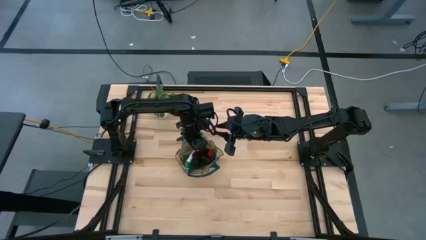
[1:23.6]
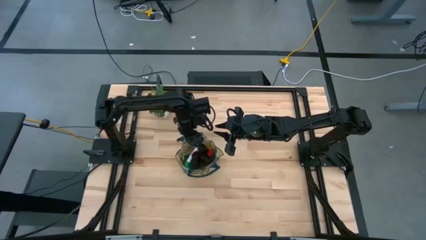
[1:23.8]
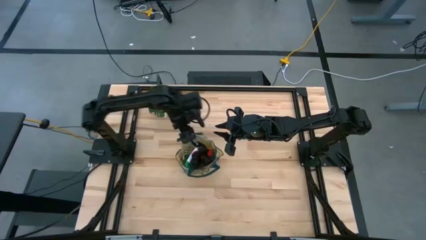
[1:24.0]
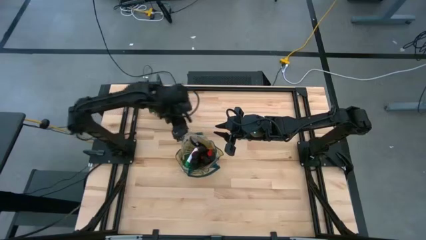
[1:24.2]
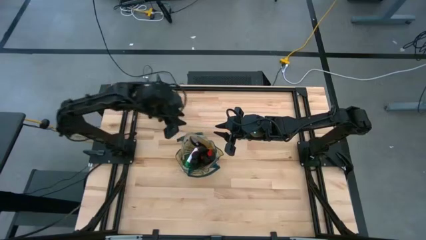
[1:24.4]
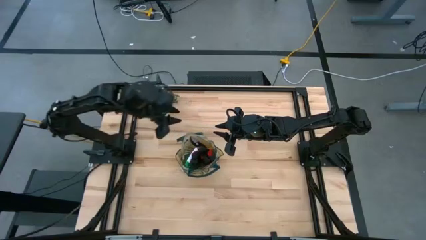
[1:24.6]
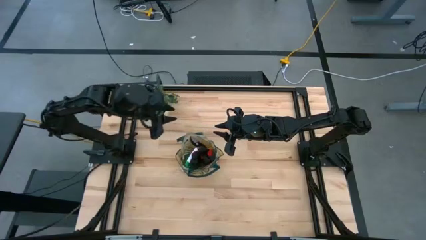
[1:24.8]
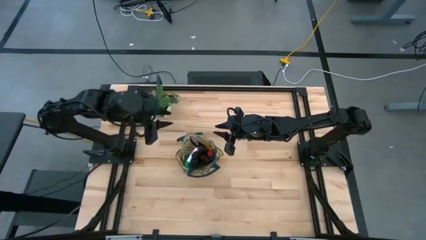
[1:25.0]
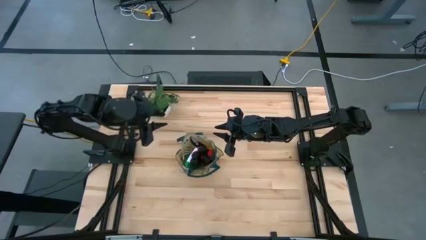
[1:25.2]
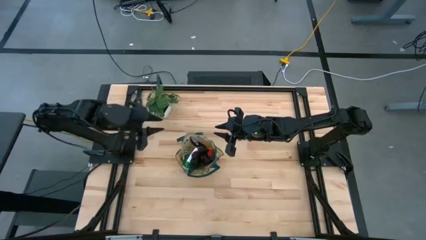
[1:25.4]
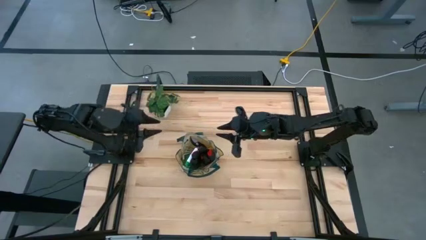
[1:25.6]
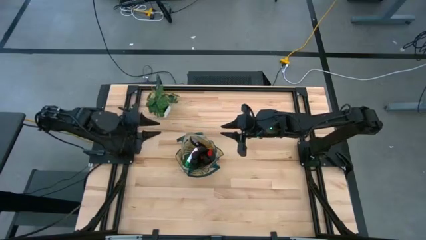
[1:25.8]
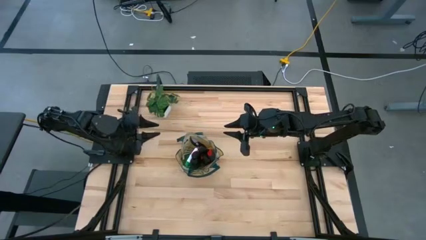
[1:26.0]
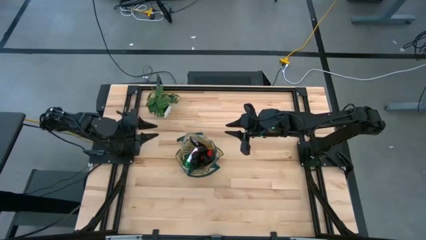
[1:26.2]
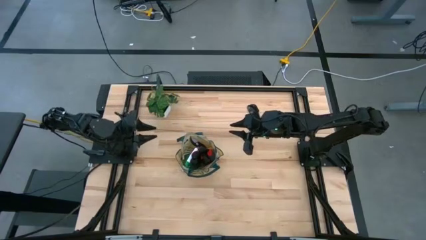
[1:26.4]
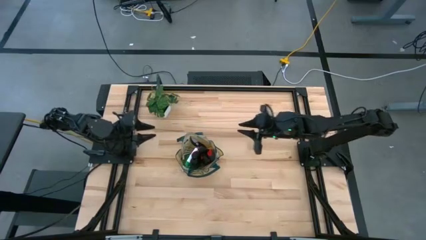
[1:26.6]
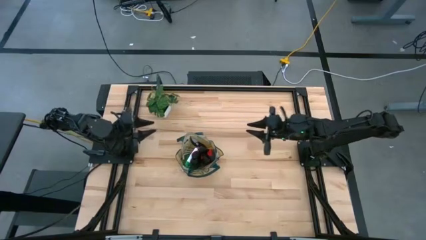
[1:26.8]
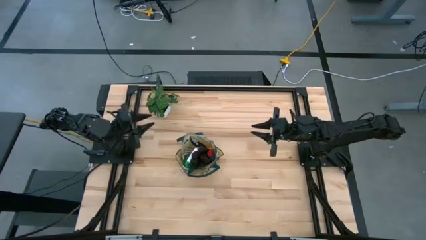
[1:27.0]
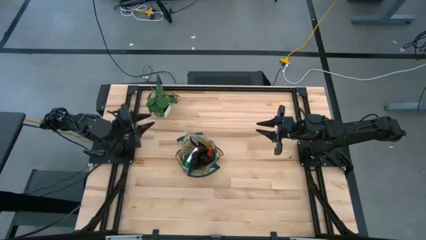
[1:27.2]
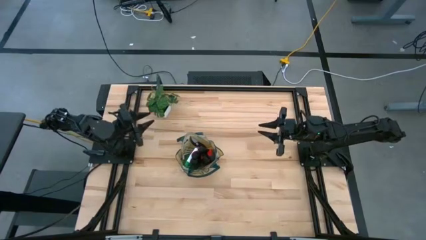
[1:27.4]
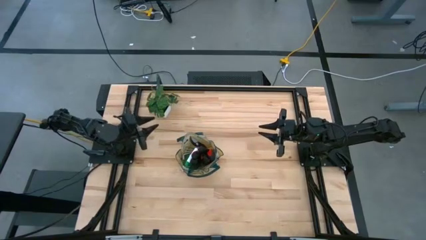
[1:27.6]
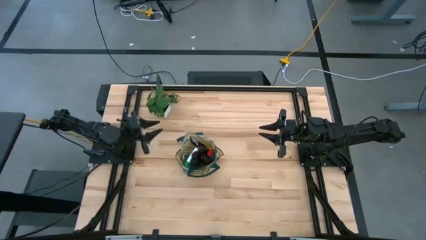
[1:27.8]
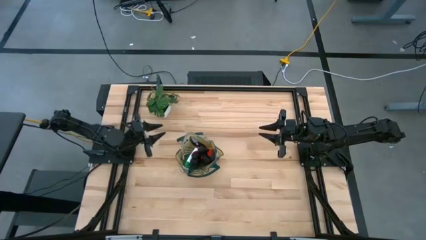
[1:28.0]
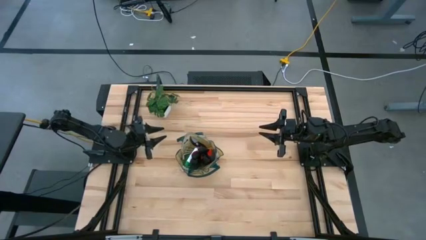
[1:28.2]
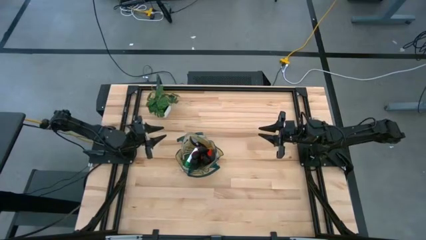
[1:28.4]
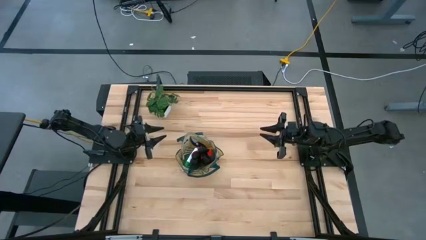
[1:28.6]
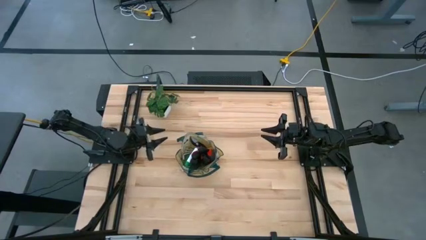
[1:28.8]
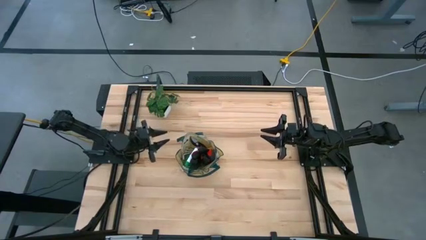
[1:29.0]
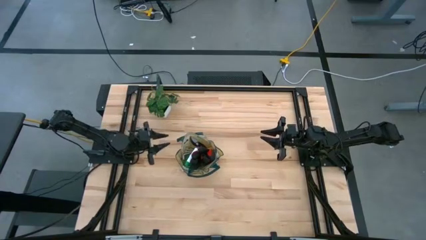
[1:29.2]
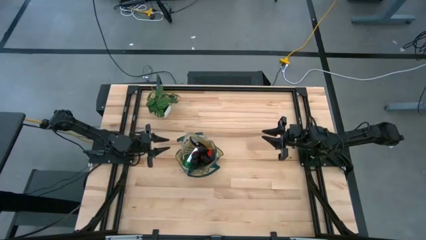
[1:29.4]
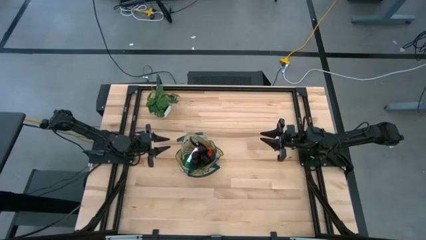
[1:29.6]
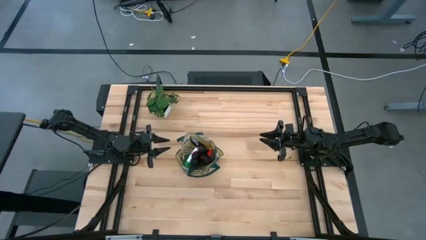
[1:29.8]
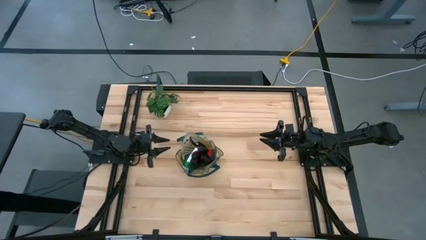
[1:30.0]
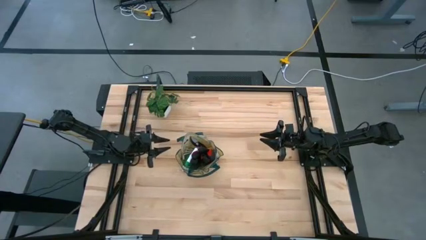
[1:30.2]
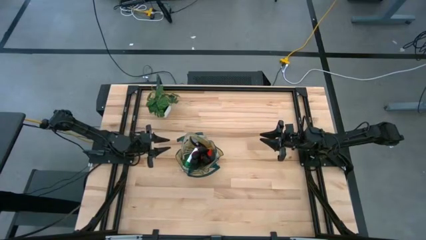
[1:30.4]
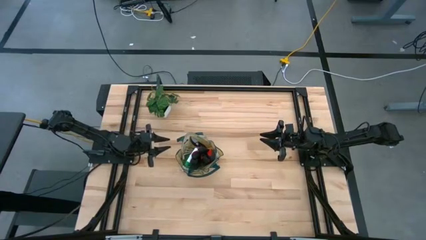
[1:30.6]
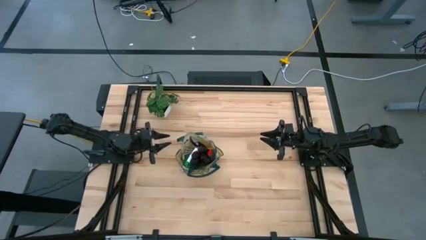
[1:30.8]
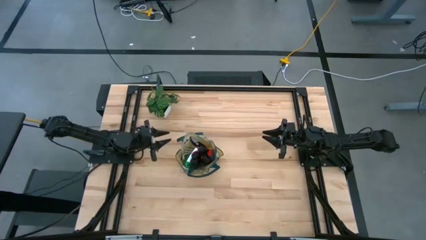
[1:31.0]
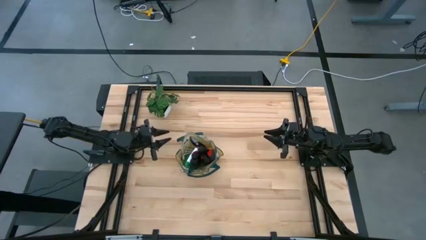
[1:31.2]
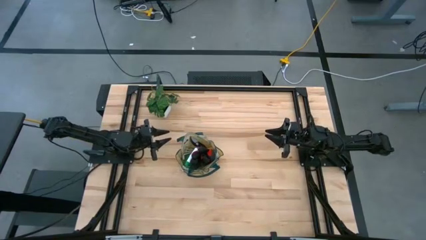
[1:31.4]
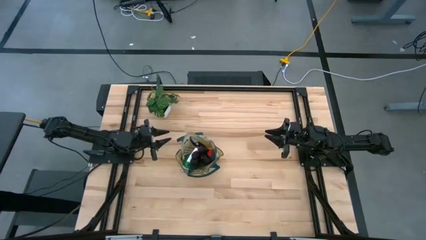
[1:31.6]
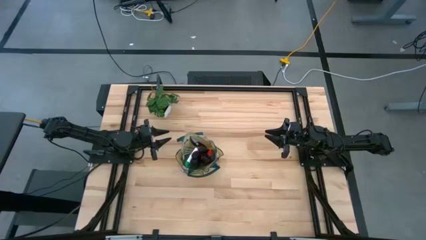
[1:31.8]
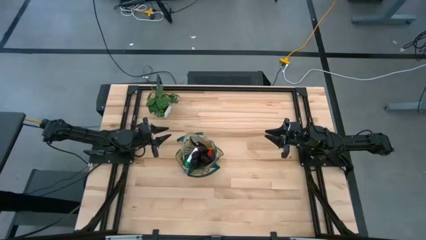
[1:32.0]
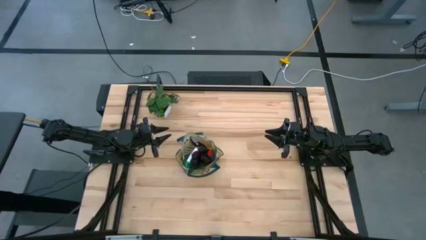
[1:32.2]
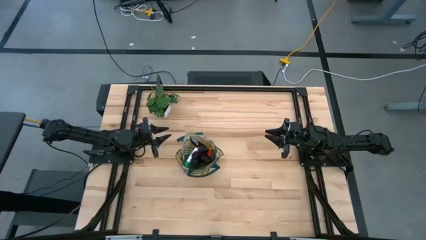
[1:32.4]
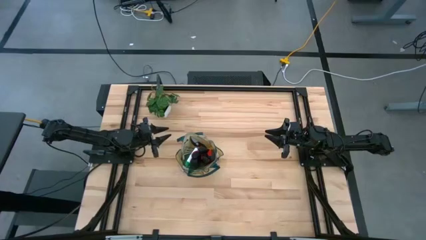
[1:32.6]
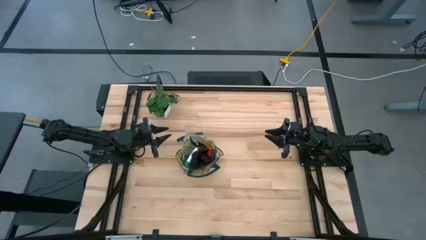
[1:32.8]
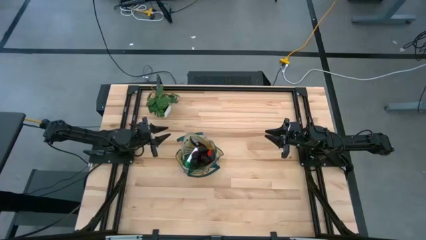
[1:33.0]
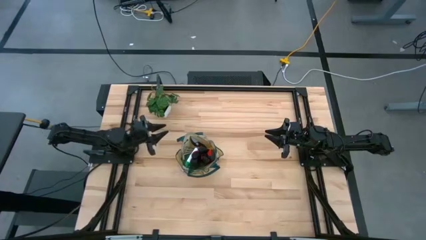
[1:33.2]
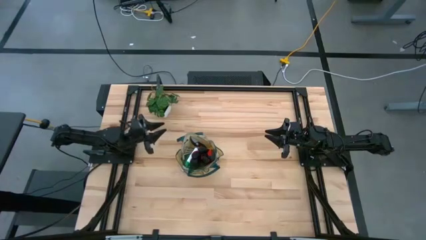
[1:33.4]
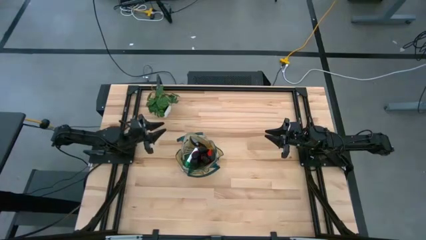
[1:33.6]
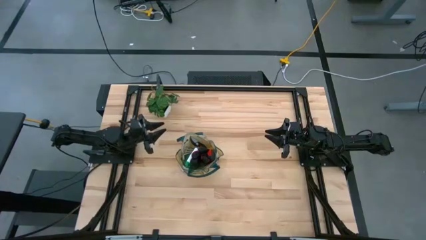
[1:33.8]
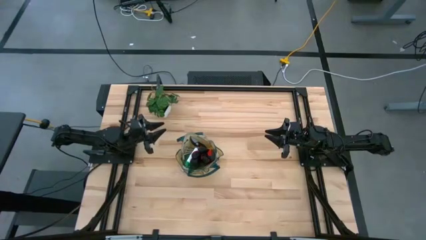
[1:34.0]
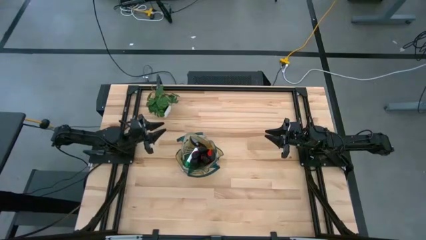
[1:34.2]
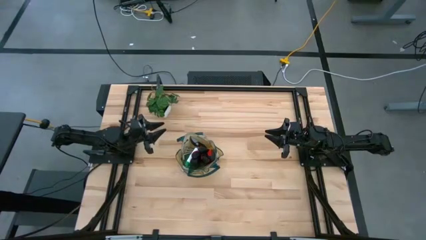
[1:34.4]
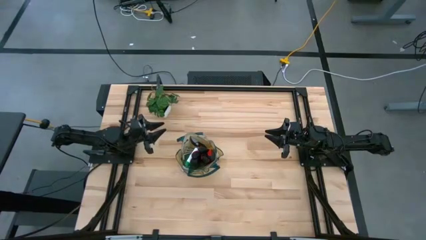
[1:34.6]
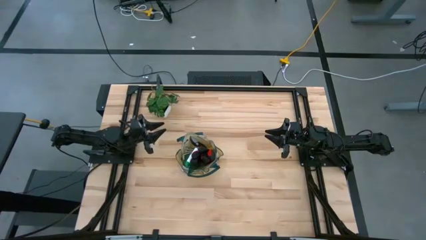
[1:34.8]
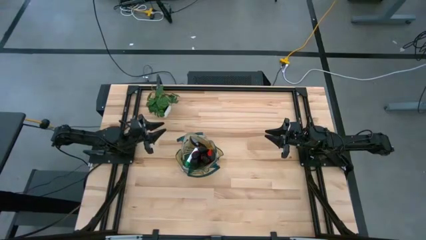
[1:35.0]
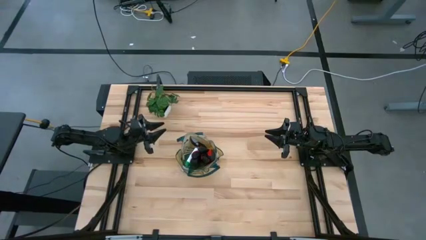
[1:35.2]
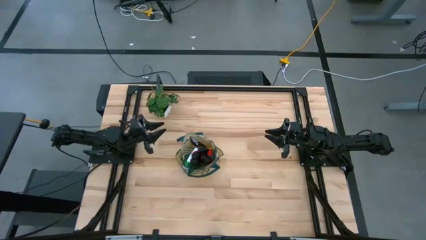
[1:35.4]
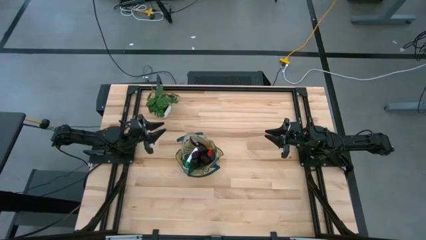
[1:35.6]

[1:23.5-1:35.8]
Task: Pick & Place Garden tools in Gardening bag
Return to Home Position
